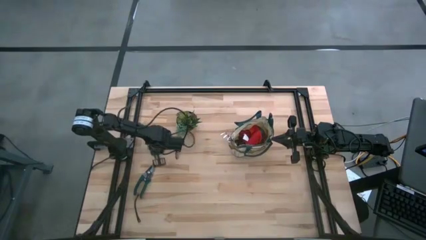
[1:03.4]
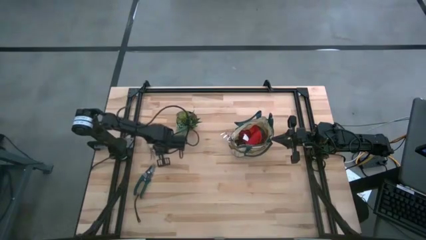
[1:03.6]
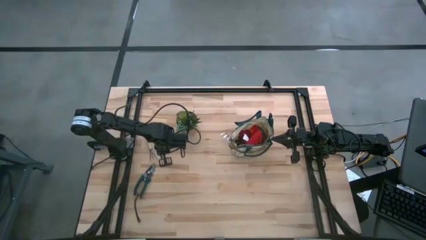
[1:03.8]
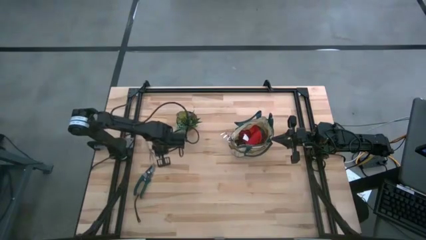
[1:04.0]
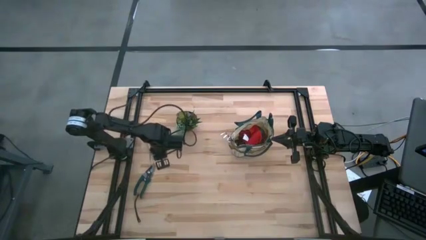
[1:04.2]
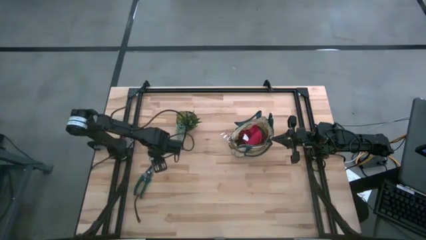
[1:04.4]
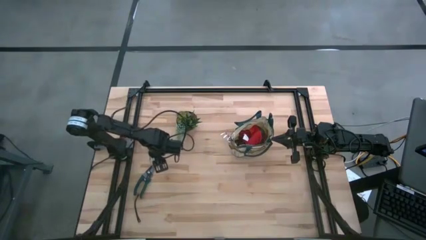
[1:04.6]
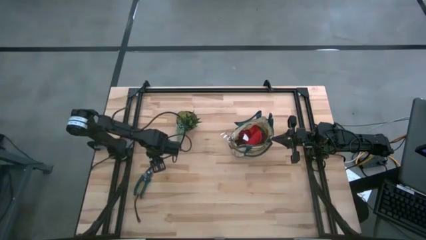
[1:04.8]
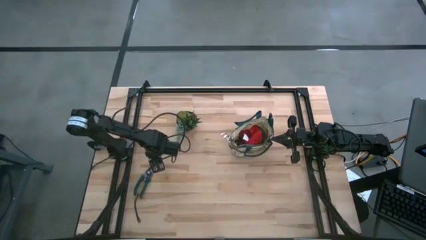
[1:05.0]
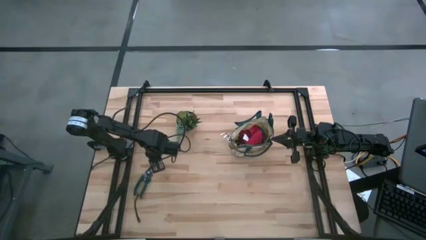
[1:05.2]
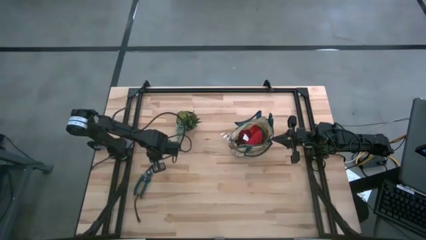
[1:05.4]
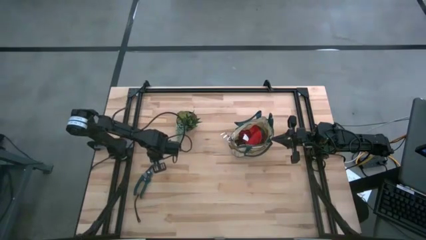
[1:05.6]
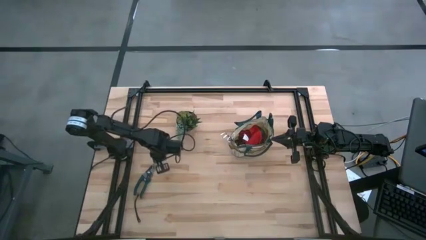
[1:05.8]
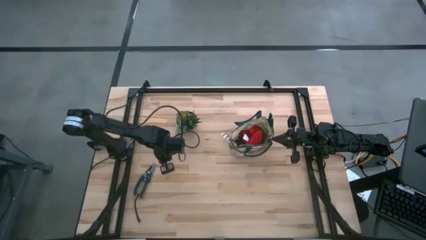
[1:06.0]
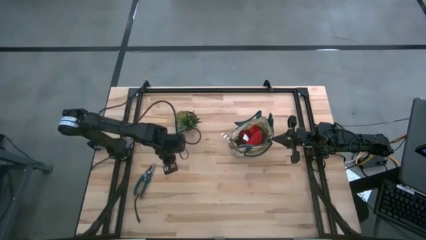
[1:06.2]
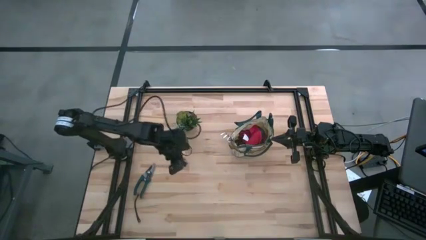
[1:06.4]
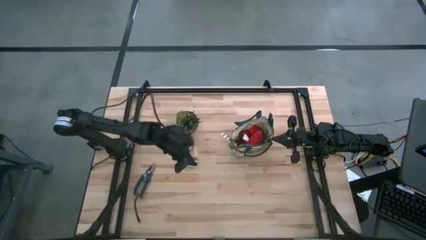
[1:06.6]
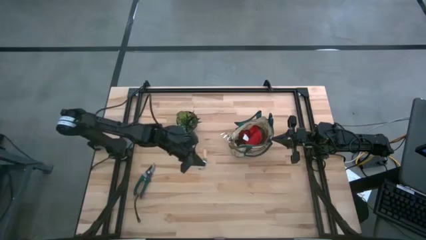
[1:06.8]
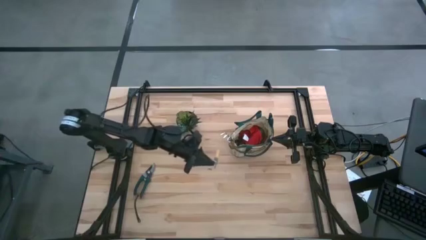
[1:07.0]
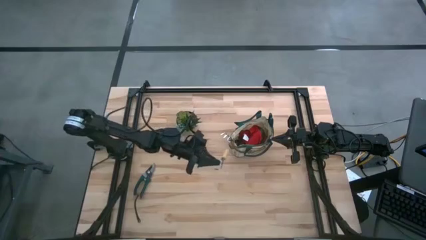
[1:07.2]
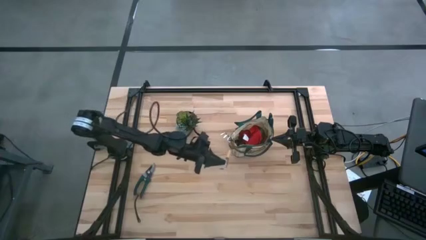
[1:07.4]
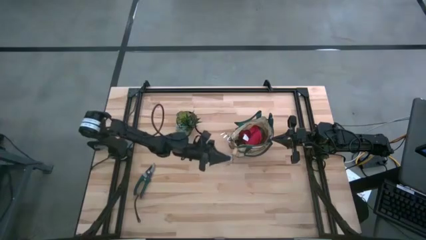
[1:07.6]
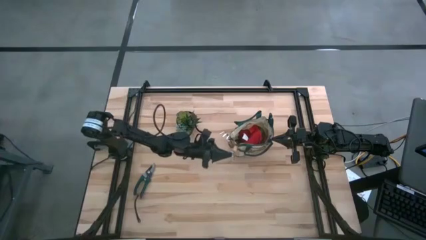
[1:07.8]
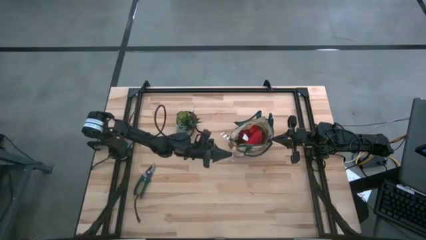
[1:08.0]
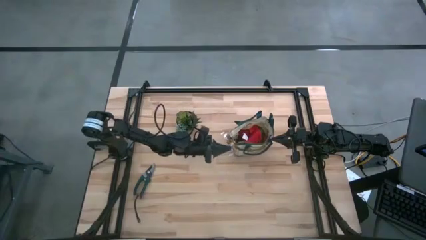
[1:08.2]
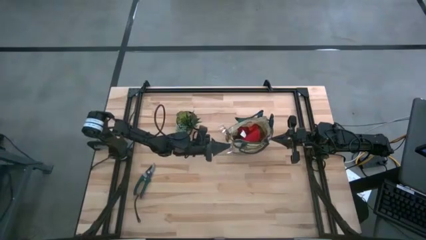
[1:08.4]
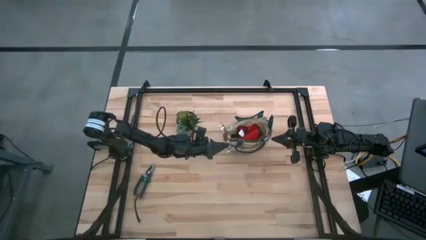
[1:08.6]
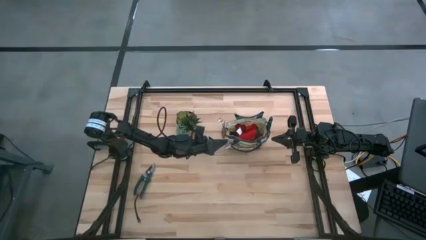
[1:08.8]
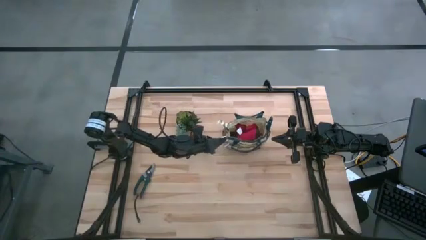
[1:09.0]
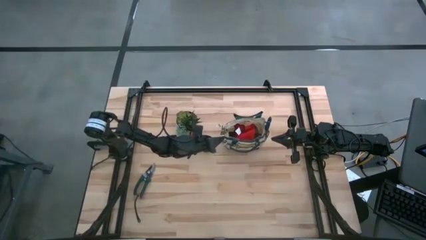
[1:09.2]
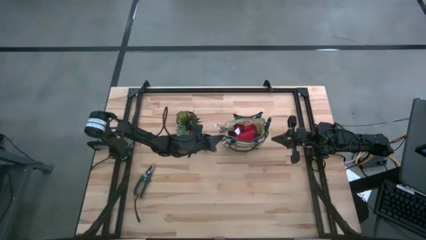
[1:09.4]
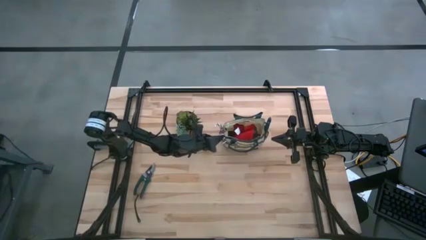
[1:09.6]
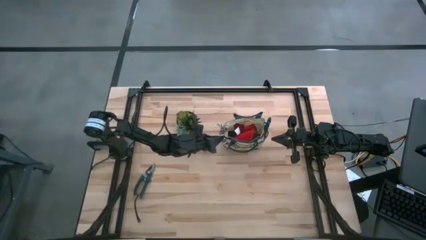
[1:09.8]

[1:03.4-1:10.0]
Task: Pick & Place Garden tools in Gardening bag
Put the brown hand rake into the gardening bag

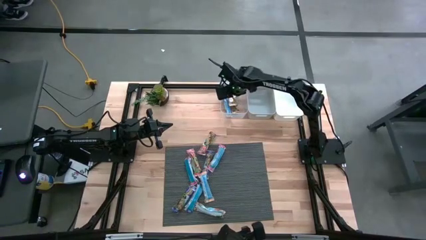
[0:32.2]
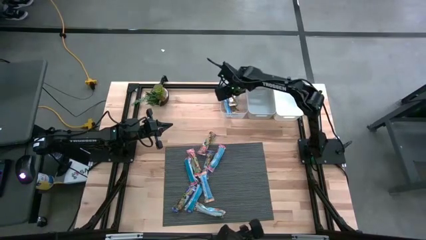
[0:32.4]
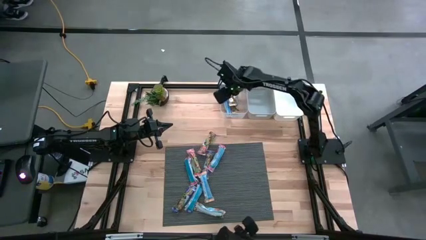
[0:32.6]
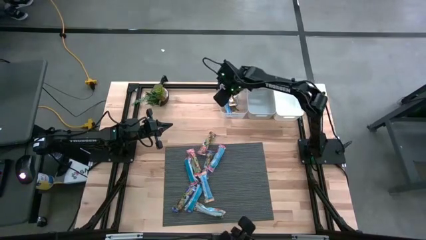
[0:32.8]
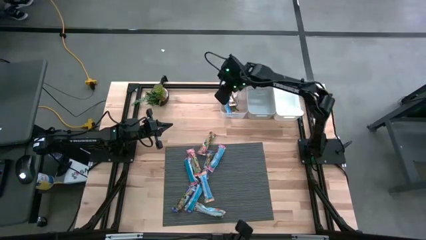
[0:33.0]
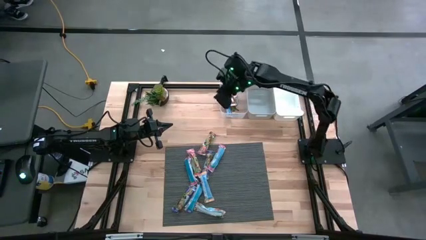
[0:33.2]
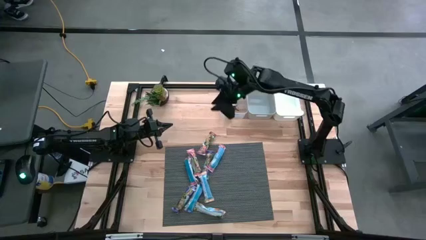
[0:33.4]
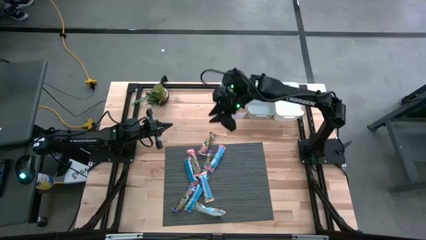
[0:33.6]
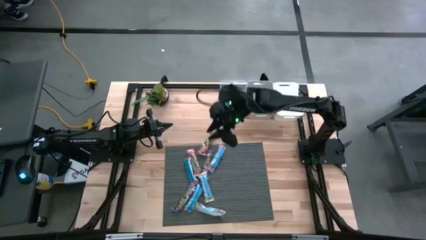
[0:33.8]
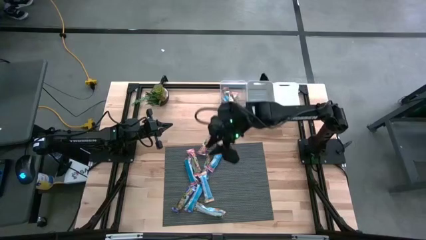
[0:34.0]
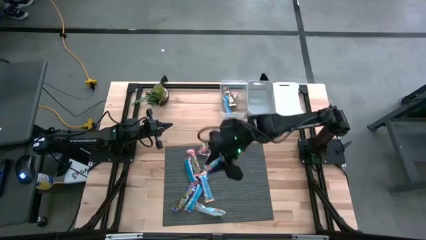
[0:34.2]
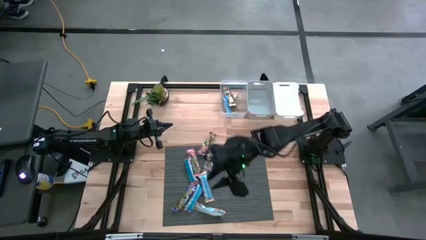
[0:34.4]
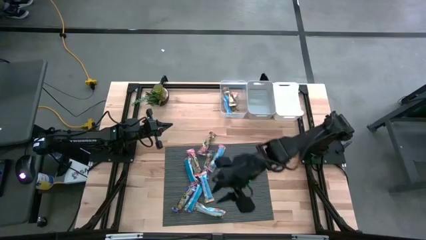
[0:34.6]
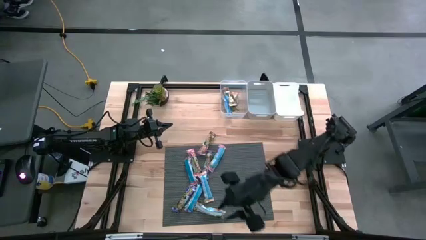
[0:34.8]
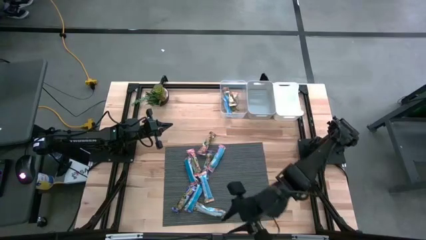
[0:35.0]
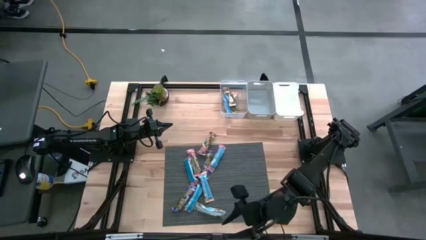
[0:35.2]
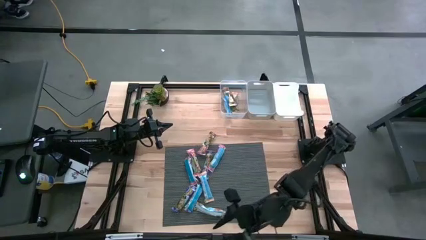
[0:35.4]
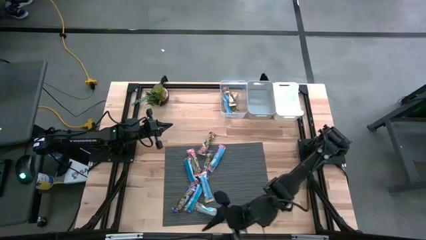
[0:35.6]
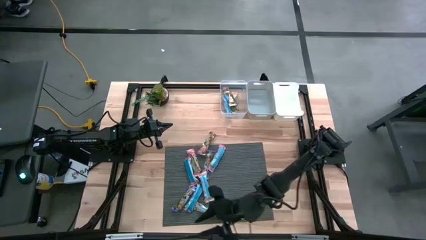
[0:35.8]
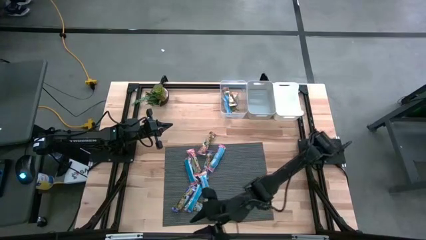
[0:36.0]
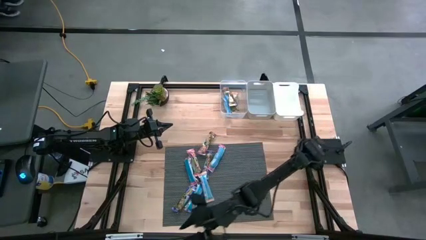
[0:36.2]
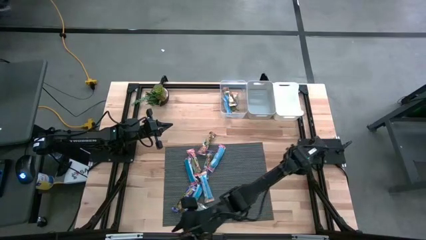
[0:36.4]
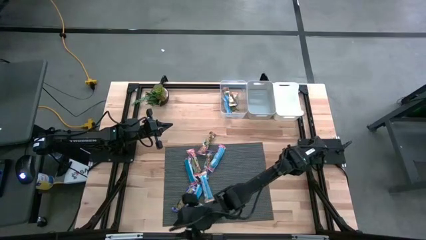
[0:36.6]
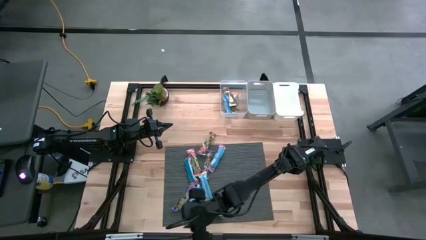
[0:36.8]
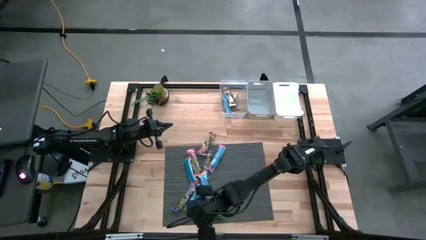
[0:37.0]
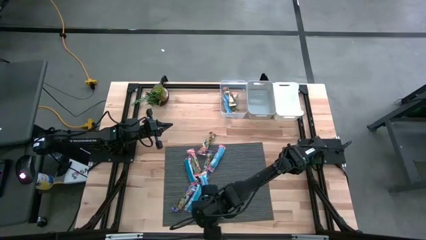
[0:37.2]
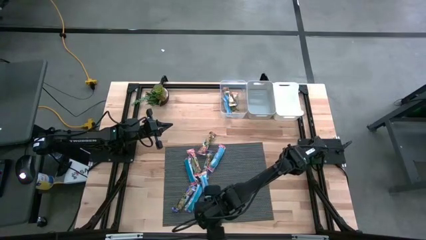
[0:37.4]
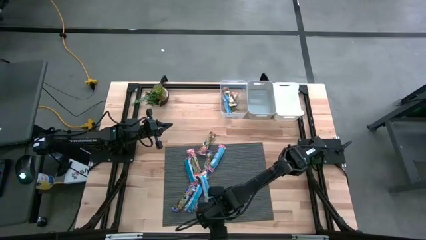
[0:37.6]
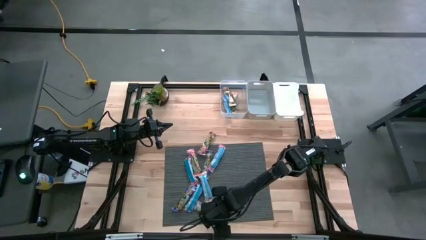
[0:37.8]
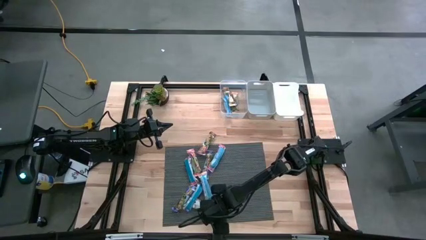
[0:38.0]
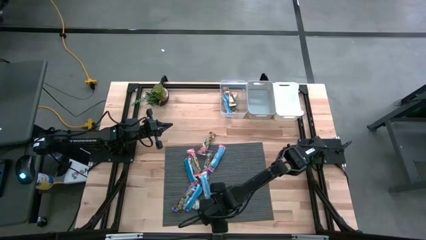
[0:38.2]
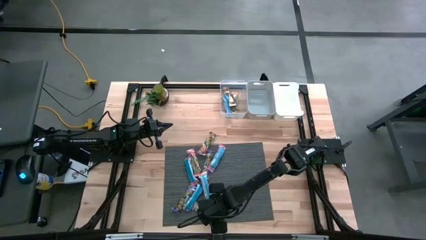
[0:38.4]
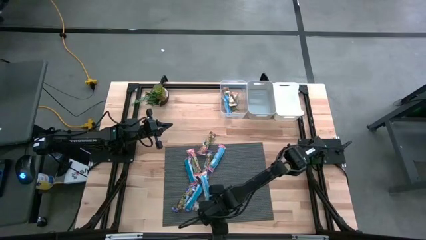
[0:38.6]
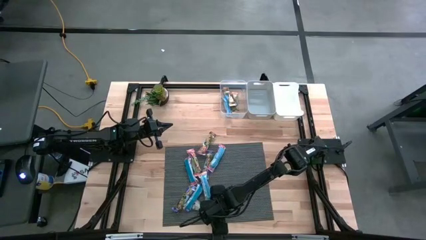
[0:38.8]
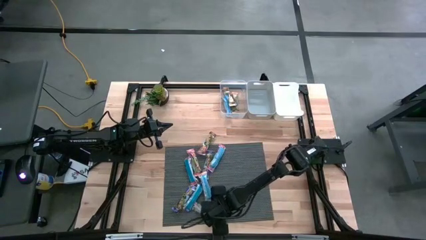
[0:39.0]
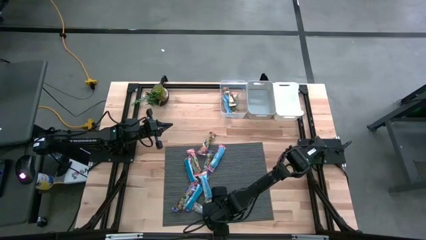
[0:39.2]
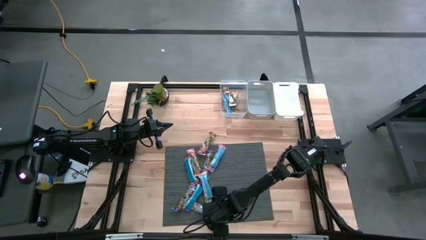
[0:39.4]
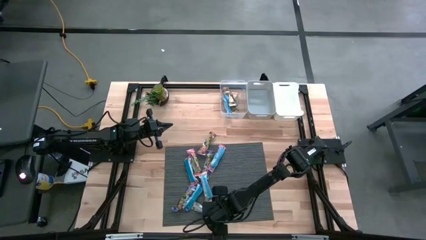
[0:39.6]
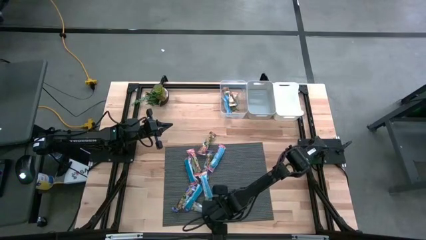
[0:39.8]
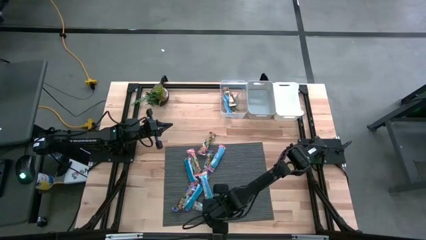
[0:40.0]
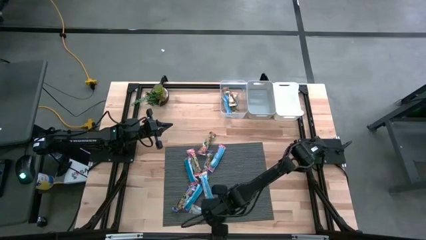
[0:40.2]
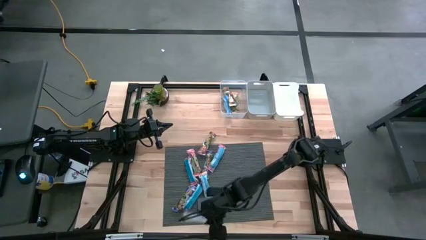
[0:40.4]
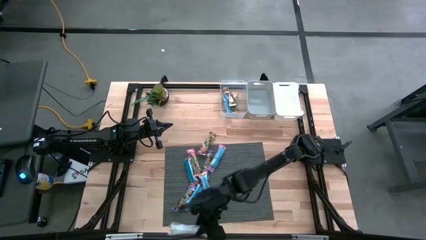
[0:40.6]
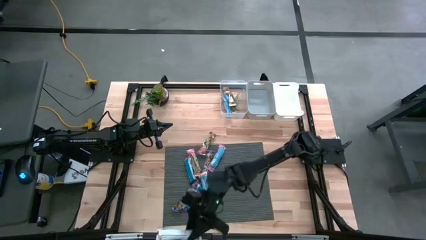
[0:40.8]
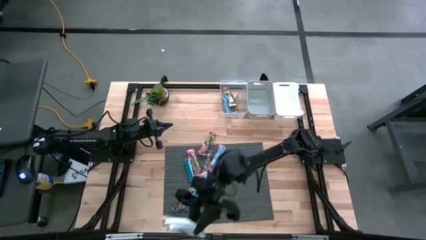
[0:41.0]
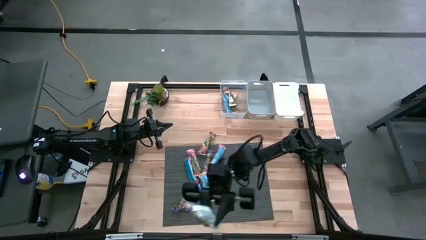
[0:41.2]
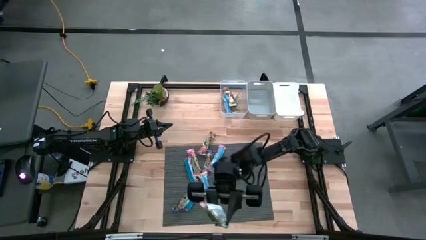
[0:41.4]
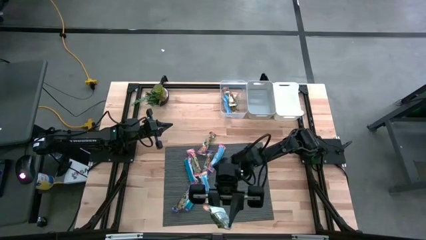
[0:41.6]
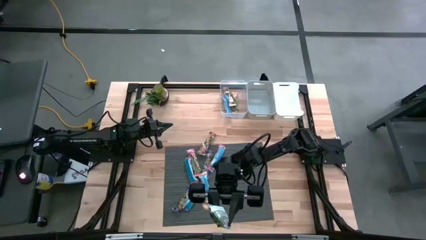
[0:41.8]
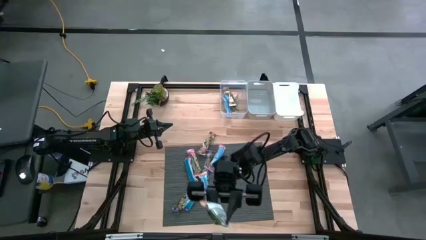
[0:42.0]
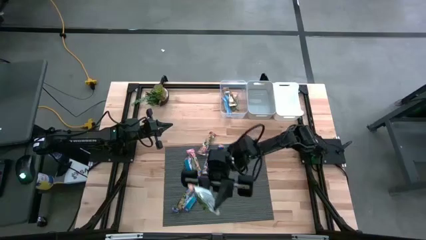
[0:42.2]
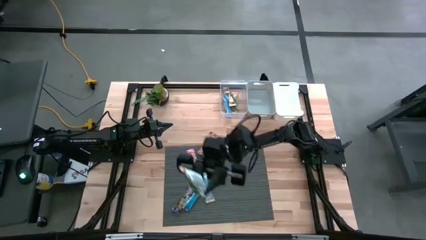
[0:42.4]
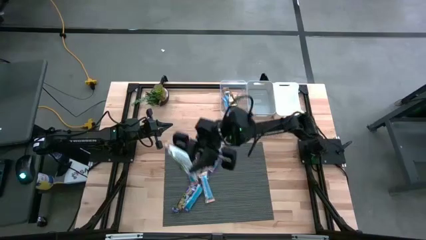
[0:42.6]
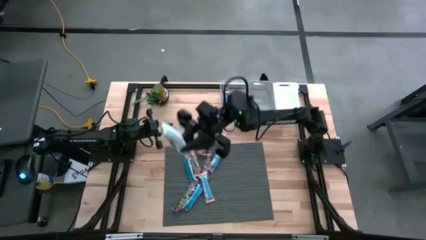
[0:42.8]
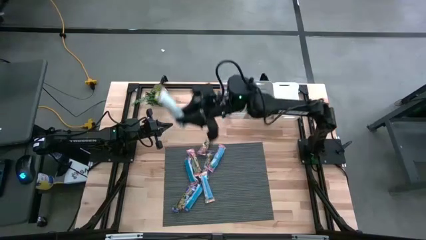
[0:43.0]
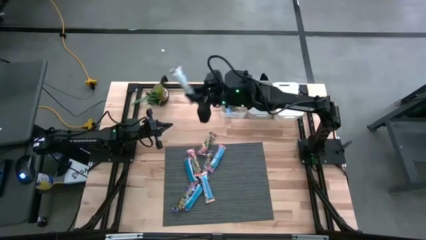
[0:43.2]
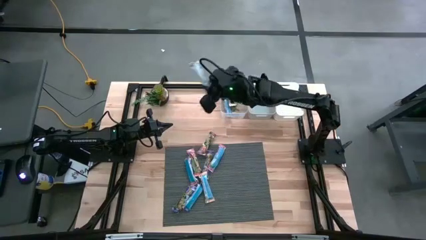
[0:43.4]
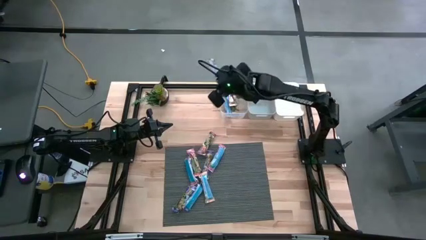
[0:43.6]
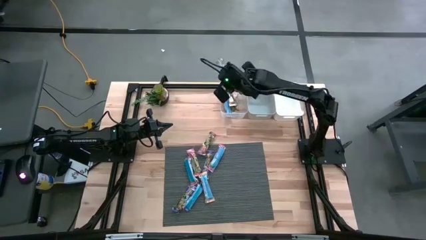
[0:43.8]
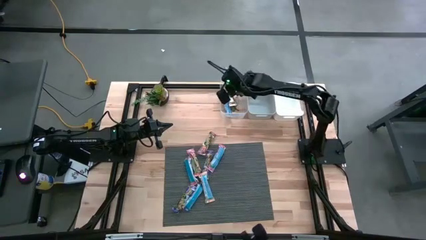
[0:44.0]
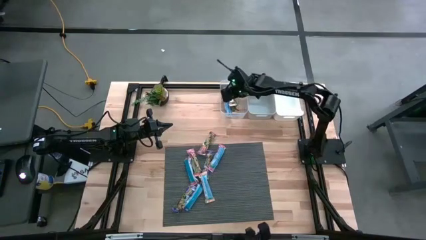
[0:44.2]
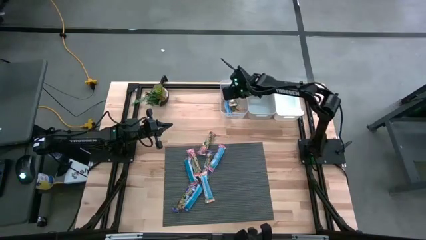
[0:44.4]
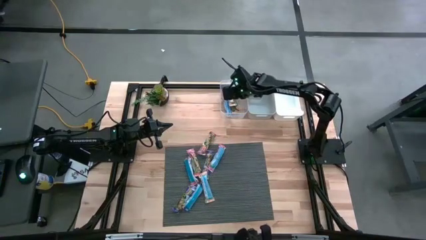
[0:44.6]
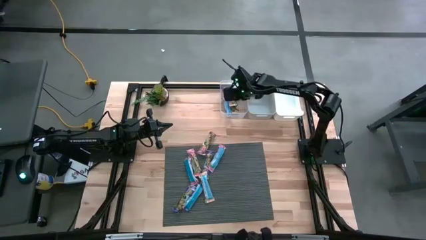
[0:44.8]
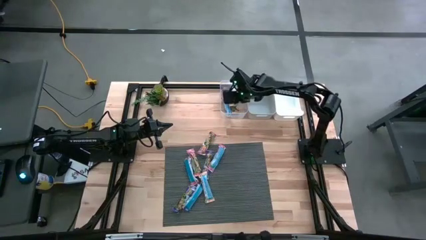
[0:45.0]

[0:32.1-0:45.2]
Task: Pick and place Granola Bars by type
Put the yellow granola bar into the transparent bin
